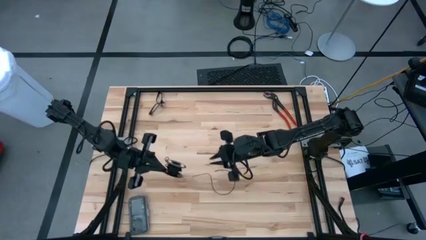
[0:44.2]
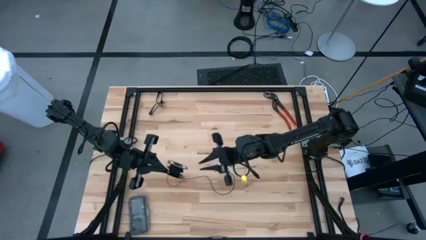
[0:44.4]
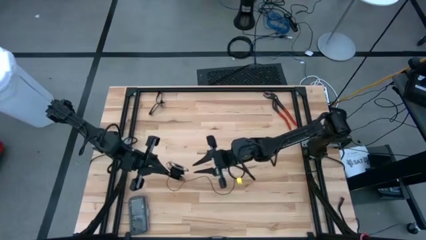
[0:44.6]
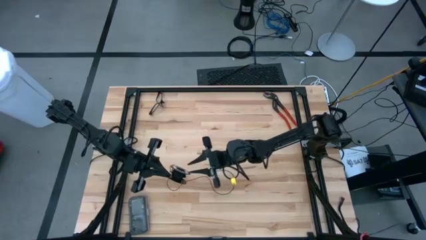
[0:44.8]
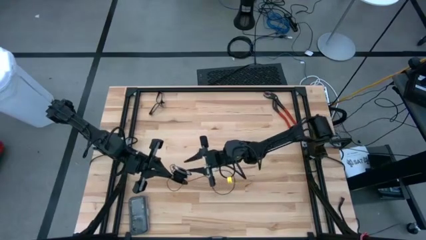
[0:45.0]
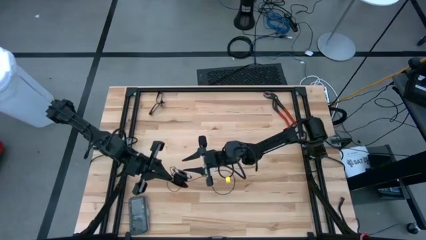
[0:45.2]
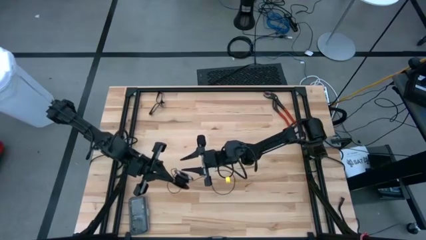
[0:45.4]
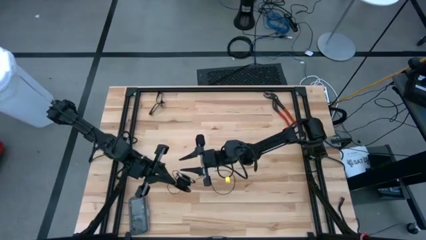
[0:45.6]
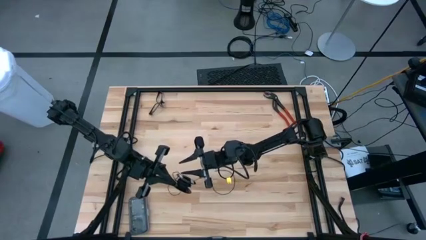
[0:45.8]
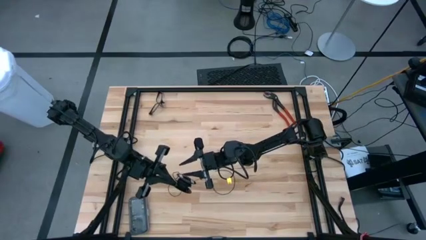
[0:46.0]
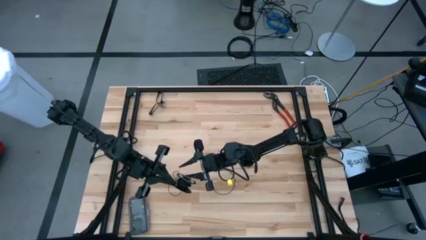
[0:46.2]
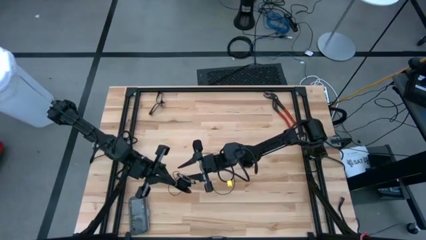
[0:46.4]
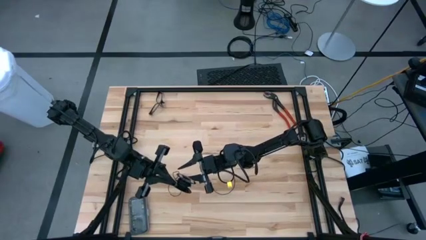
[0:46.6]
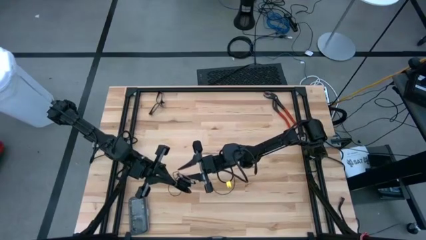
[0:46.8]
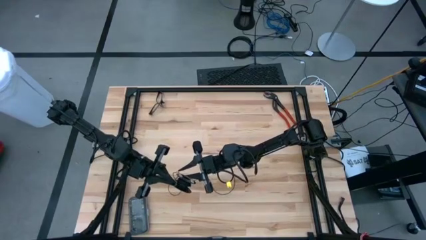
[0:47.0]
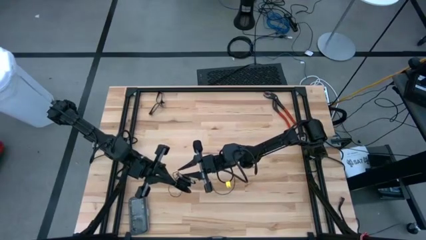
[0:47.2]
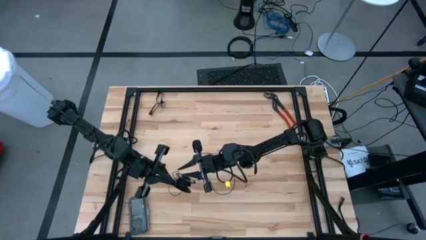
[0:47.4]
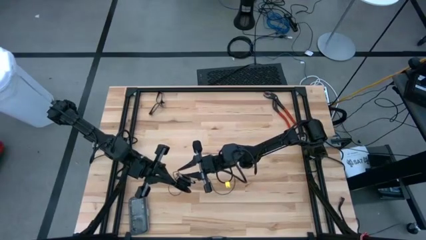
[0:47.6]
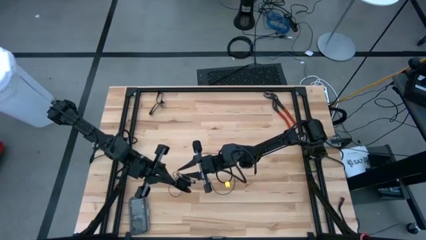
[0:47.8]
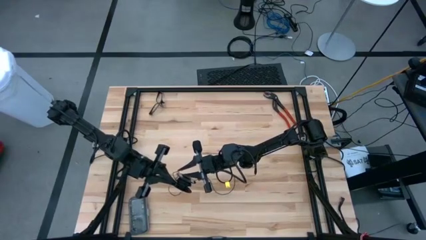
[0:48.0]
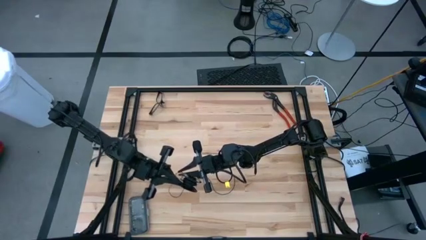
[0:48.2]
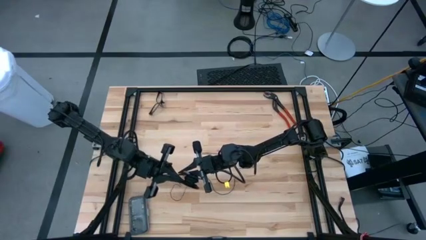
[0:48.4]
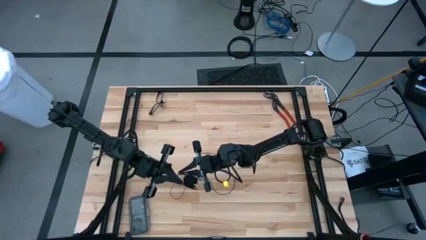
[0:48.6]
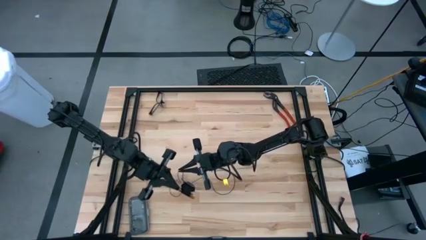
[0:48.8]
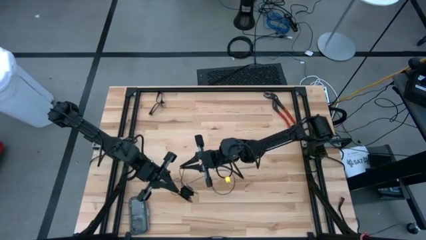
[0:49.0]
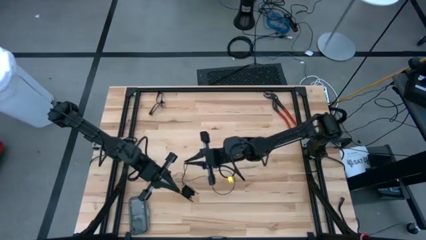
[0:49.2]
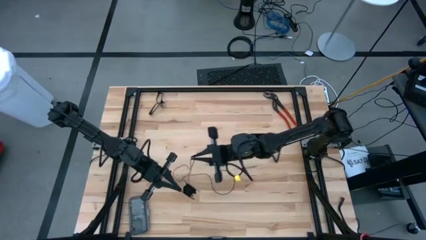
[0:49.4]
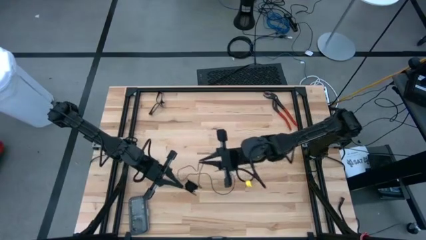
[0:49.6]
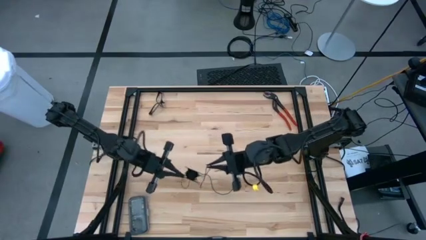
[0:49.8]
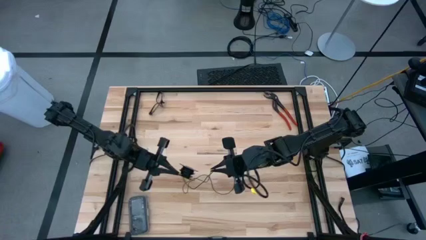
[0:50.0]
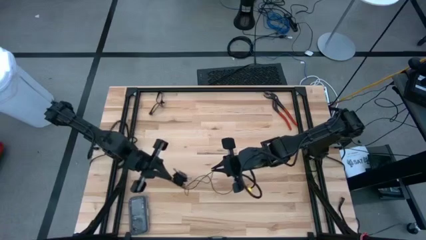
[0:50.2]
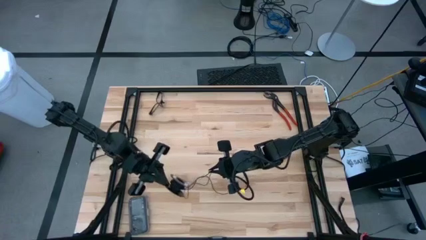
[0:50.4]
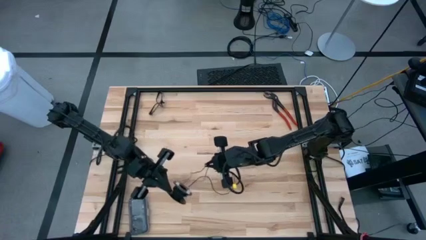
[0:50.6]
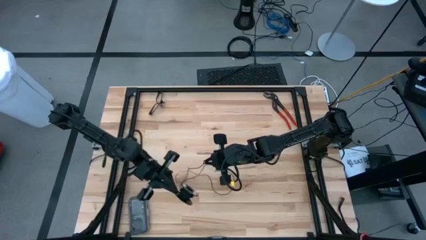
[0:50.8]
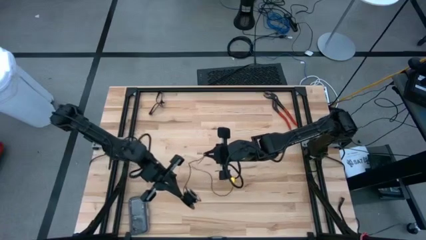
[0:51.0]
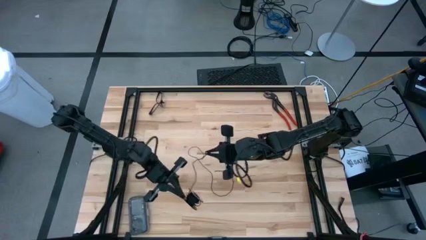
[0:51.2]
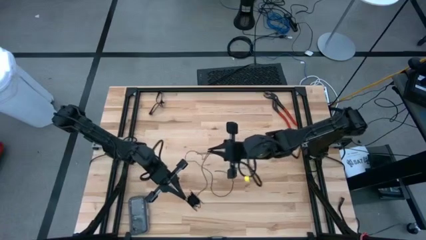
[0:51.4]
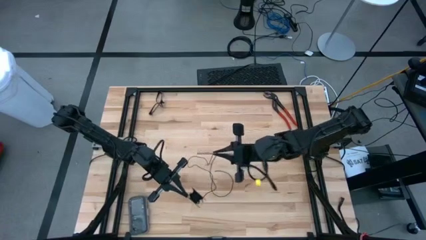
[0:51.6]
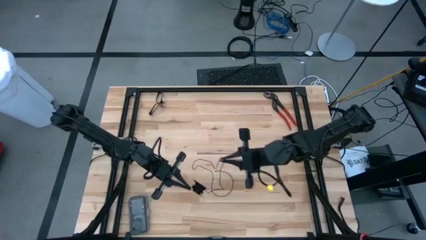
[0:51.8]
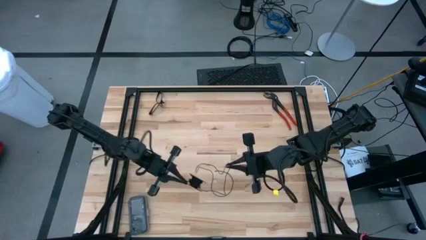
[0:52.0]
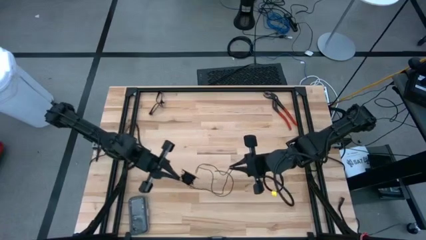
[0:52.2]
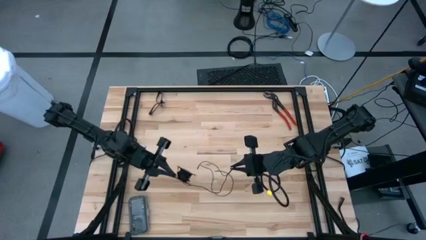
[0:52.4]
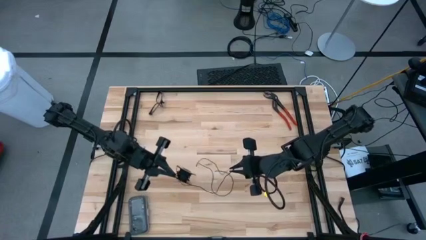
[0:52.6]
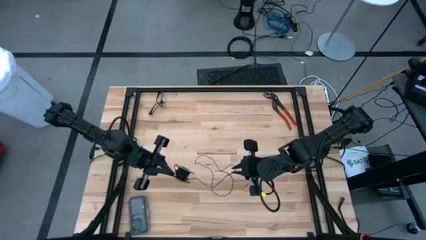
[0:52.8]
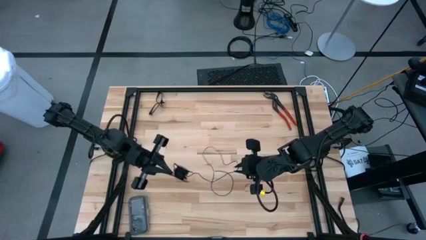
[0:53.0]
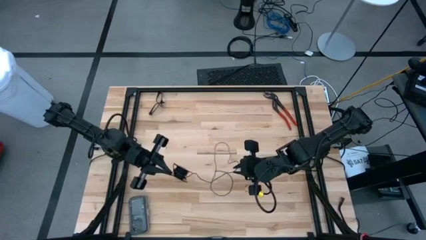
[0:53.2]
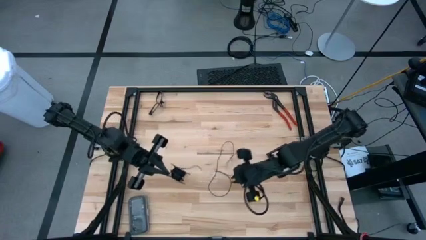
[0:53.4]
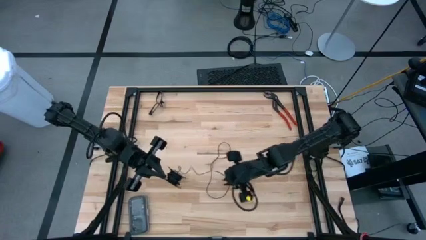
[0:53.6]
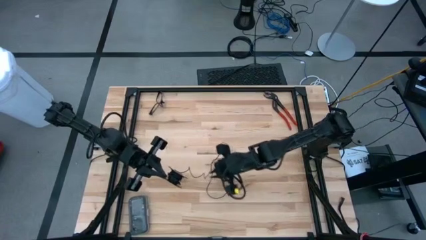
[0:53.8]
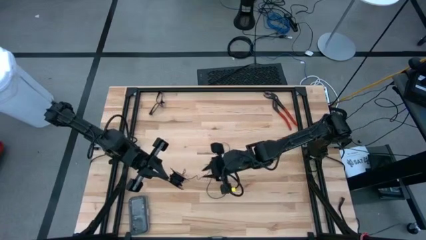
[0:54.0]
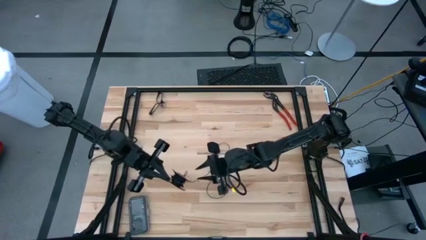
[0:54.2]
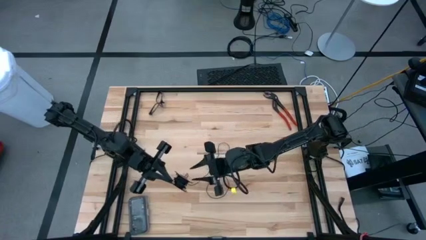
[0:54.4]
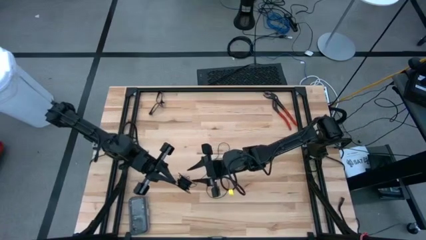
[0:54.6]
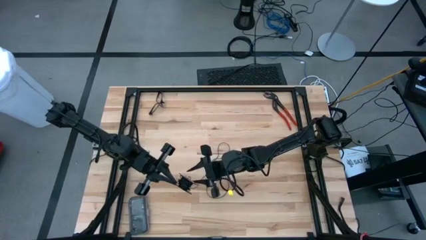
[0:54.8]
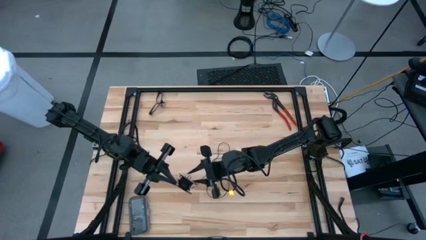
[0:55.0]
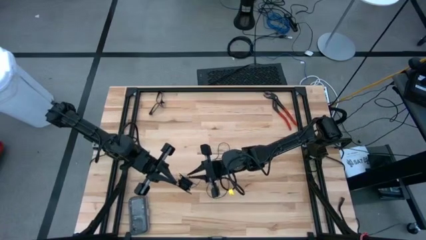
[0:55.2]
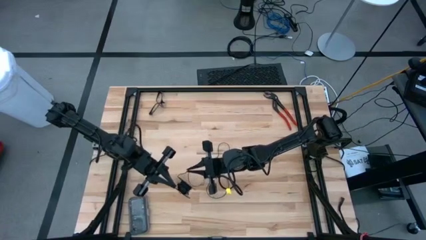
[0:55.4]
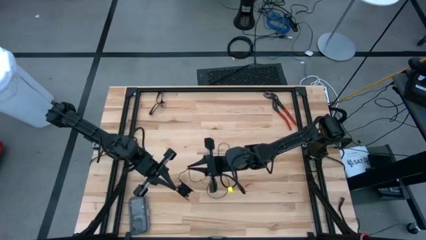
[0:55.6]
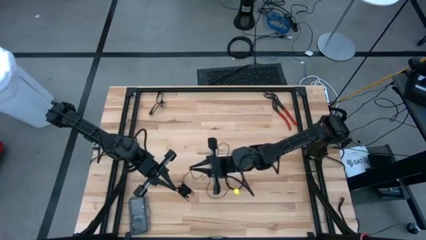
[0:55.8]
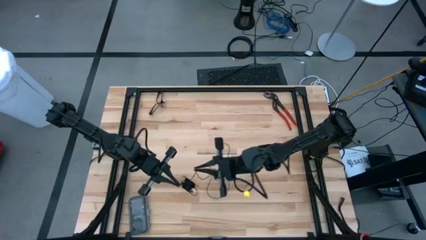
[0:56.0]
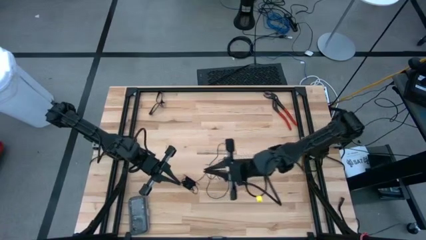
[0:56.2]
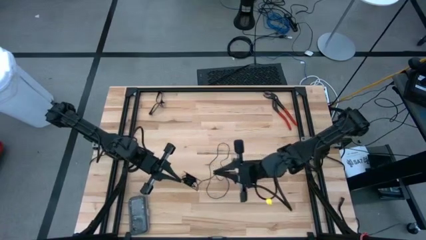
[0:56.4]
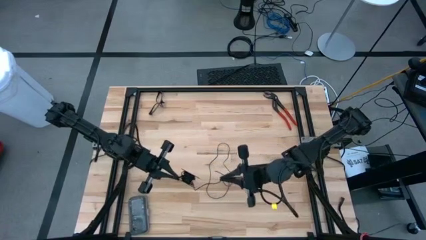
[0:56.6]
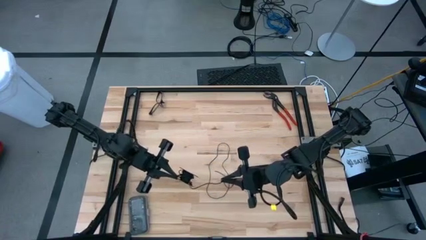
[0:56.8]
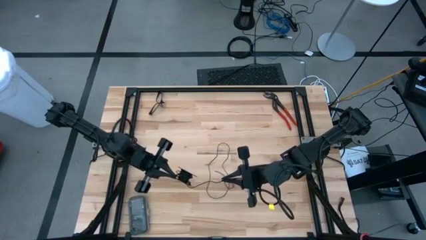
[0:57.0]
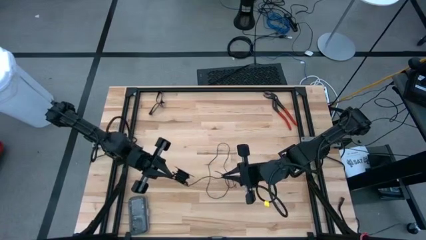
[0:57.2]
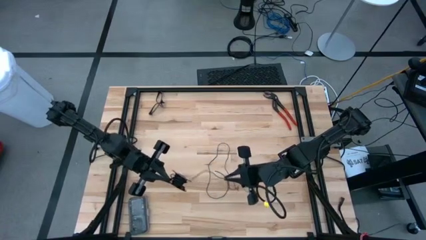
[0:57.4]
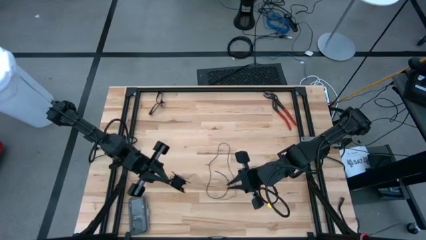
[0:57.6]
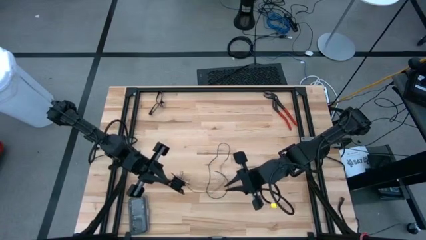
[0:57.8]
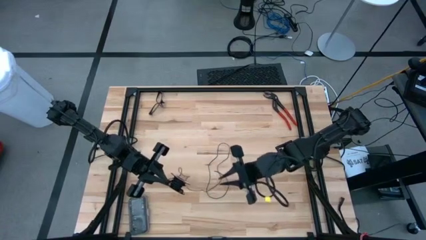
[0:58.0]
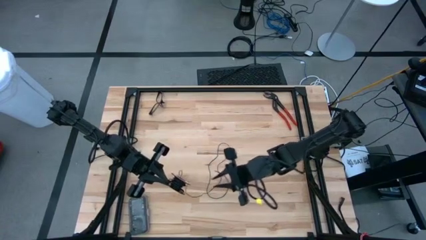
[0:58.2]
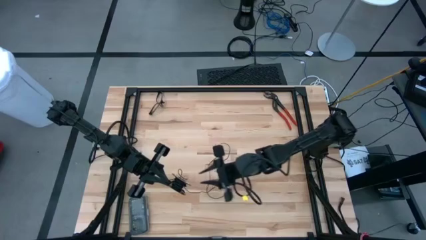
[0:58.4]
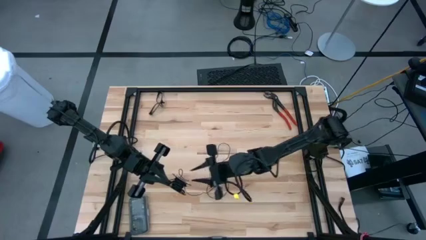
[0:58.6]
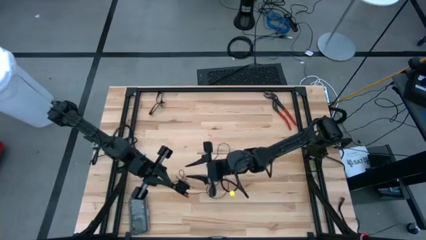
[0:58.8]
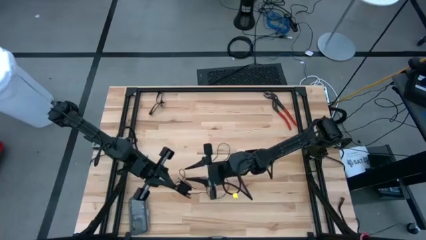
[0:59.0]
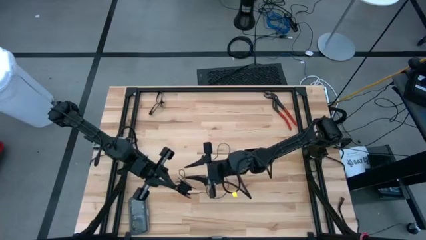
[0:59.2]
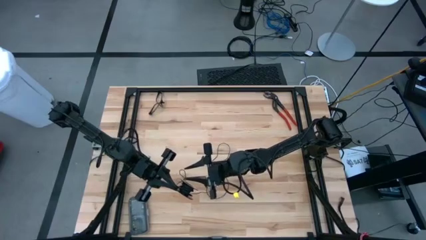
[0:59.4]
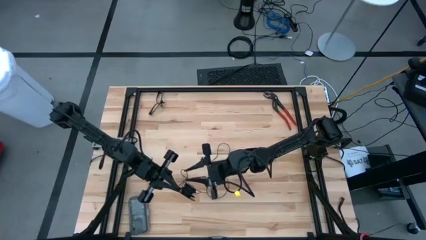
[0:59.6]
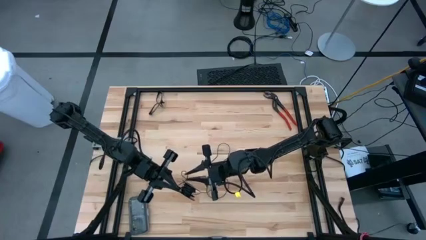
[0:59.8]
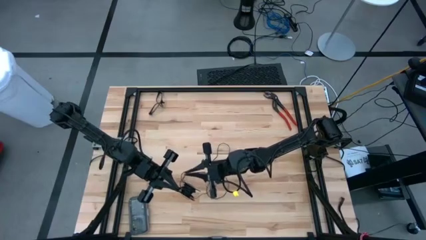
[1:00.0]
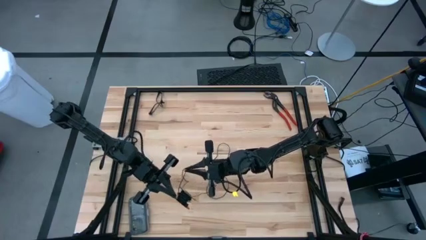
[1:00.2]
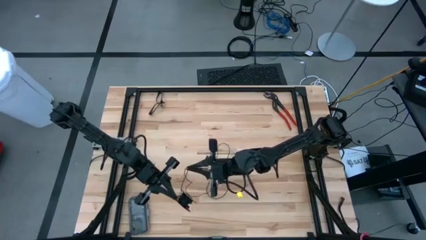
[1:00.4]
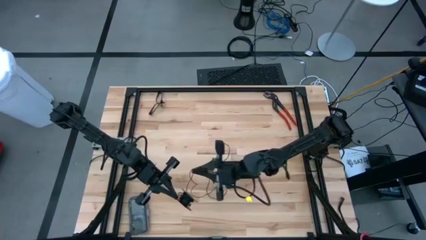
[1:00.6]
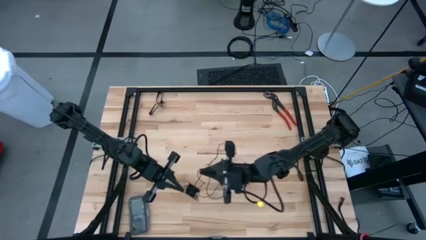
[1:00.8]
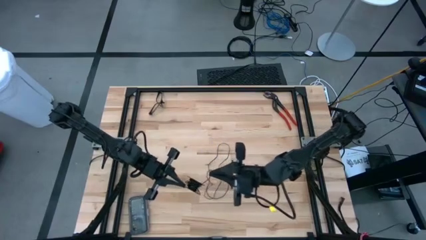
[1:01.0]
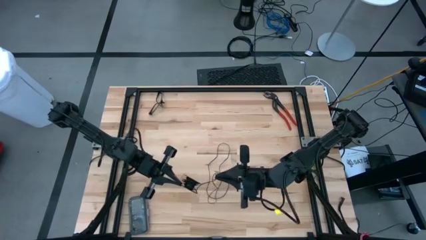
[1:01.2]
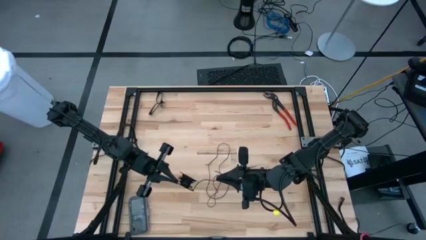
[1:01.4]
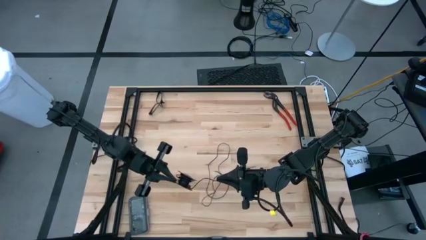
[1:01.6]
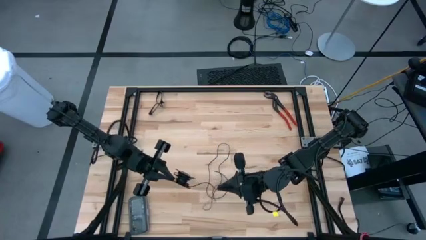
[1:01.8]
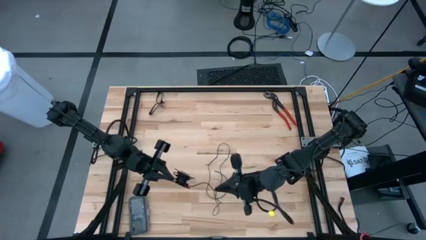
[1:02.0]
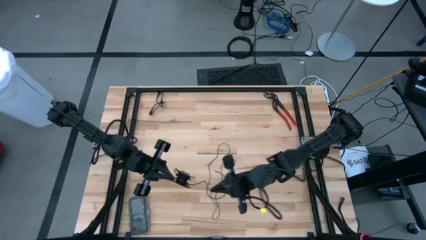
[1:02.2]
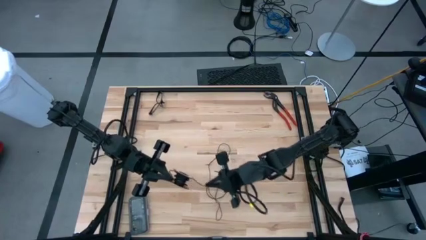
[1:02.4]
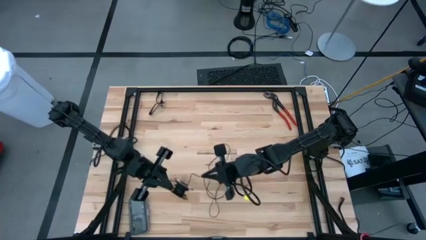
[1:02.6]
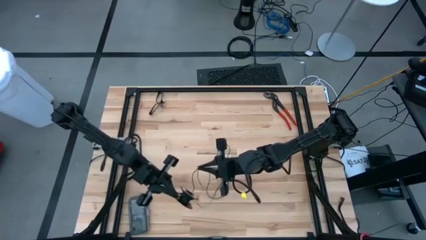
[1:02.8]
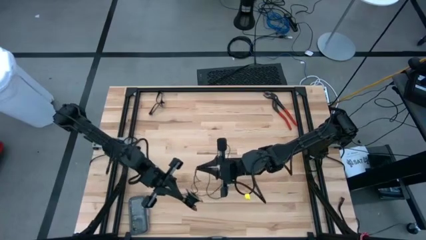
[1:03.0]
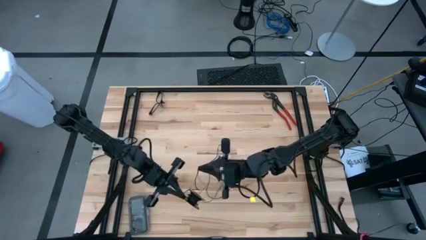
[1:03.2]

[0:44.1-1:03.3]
Task: Coil cords
Uncoil the black cable wire from the spool
